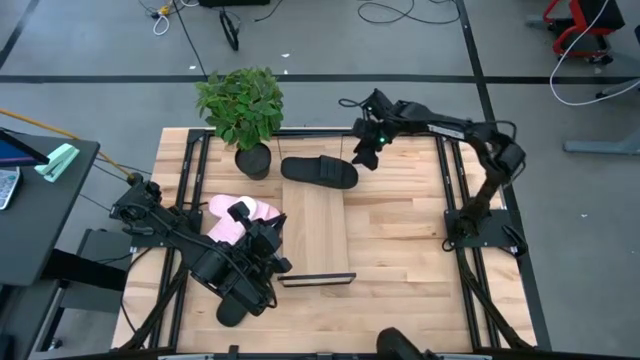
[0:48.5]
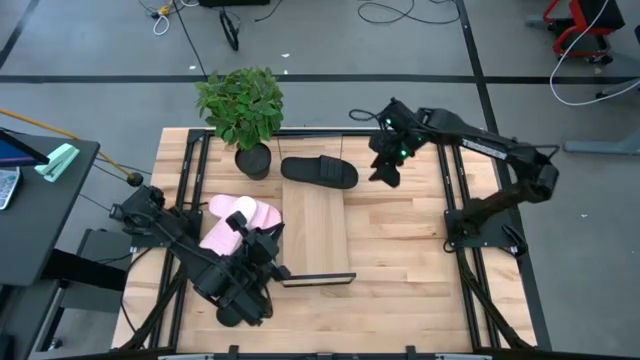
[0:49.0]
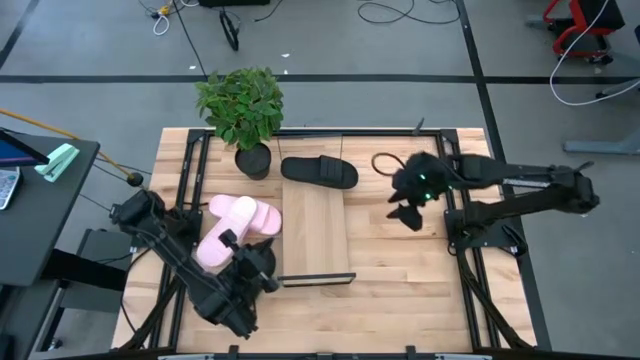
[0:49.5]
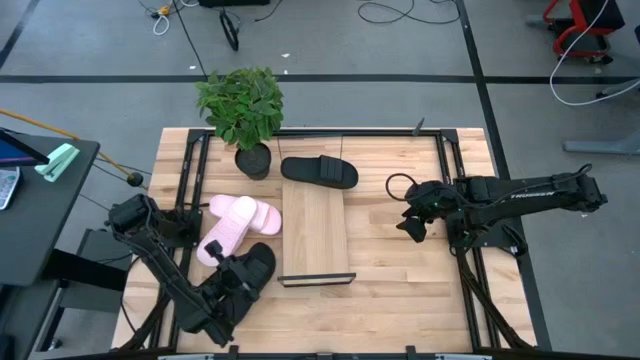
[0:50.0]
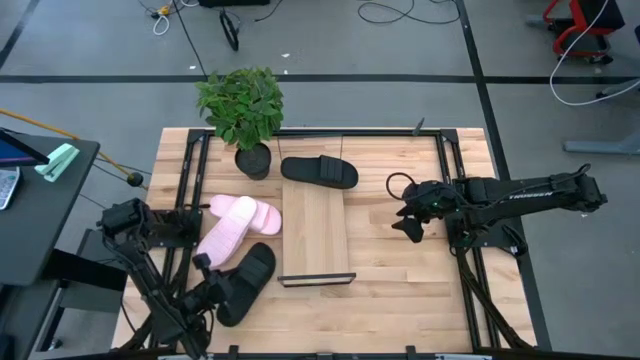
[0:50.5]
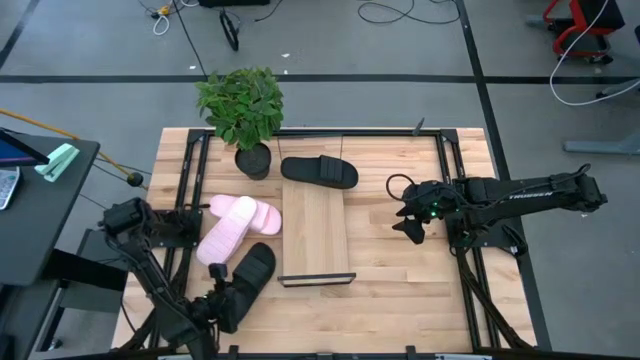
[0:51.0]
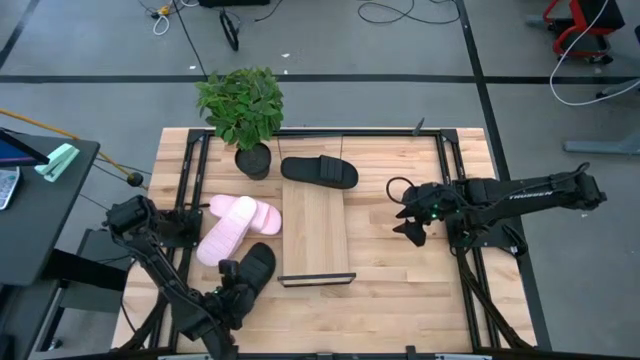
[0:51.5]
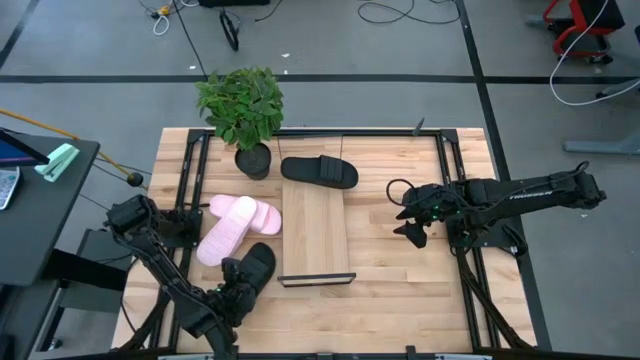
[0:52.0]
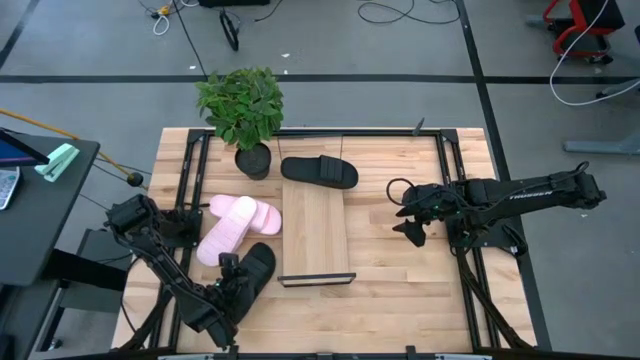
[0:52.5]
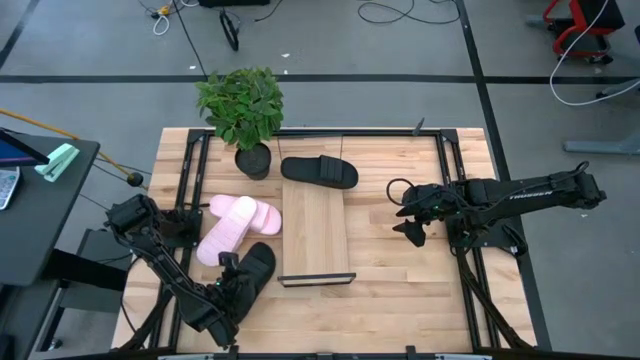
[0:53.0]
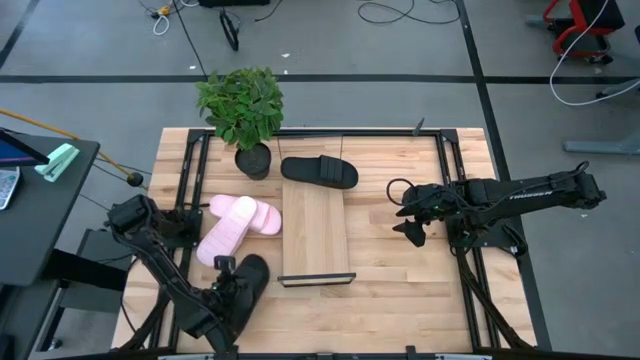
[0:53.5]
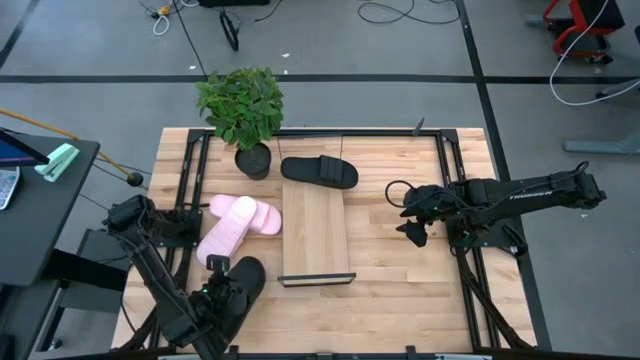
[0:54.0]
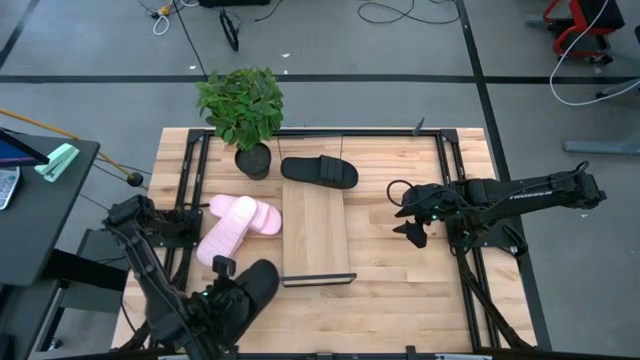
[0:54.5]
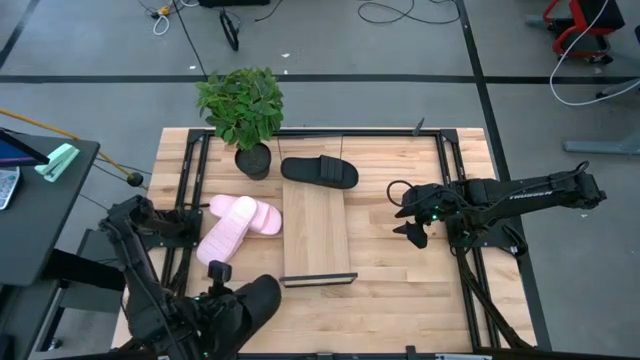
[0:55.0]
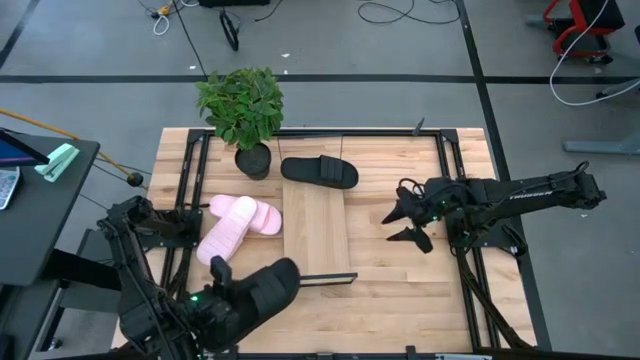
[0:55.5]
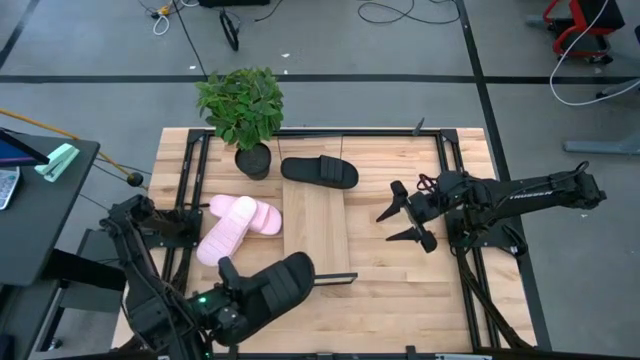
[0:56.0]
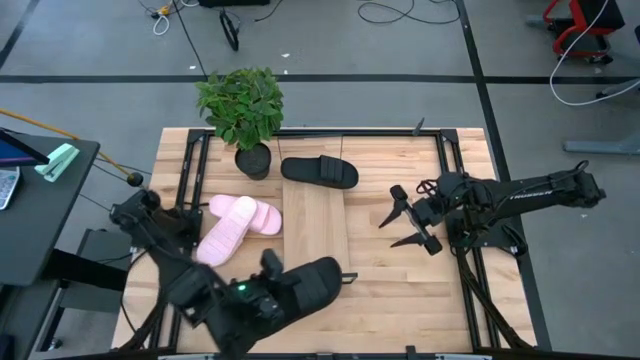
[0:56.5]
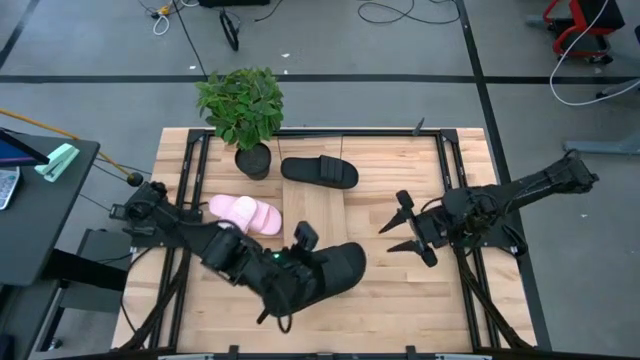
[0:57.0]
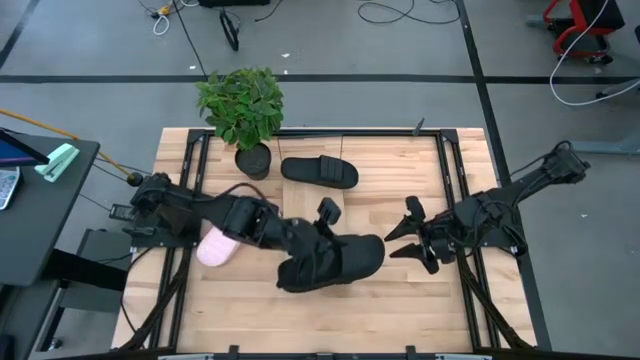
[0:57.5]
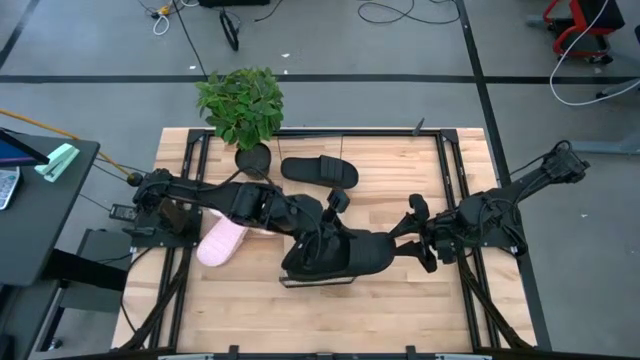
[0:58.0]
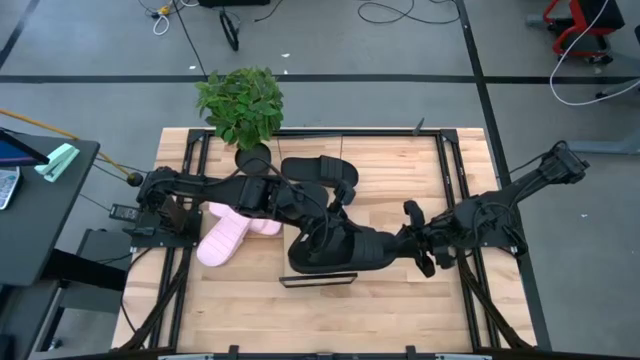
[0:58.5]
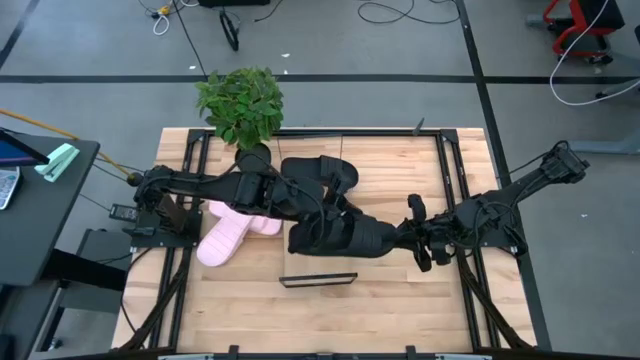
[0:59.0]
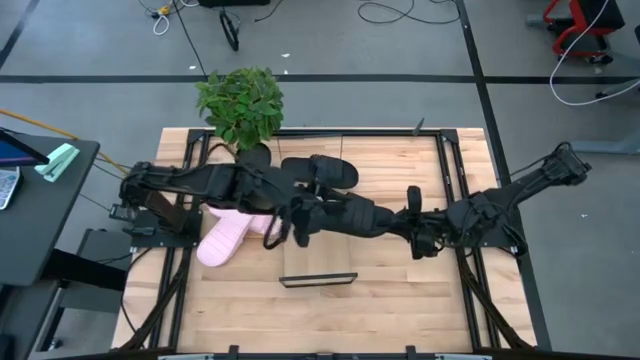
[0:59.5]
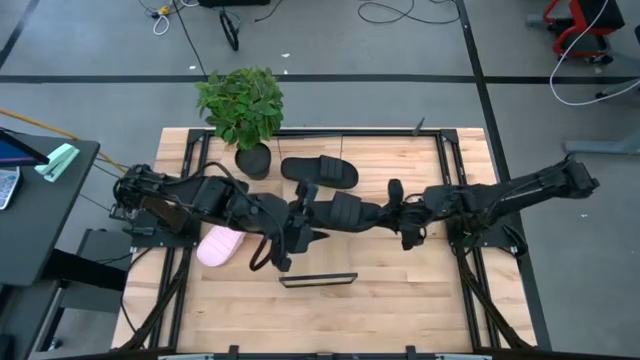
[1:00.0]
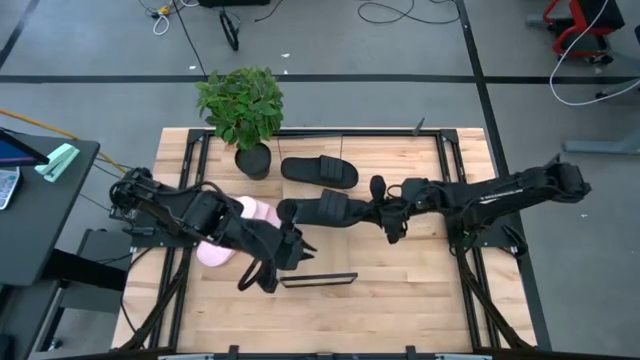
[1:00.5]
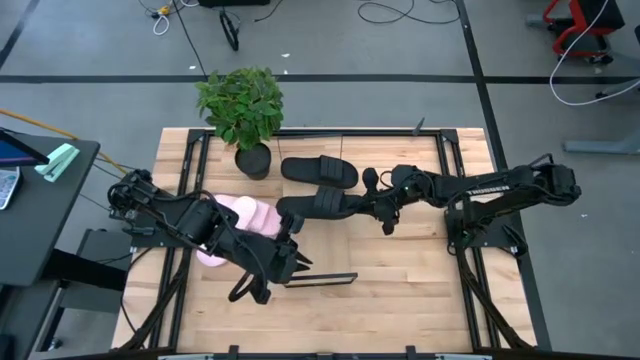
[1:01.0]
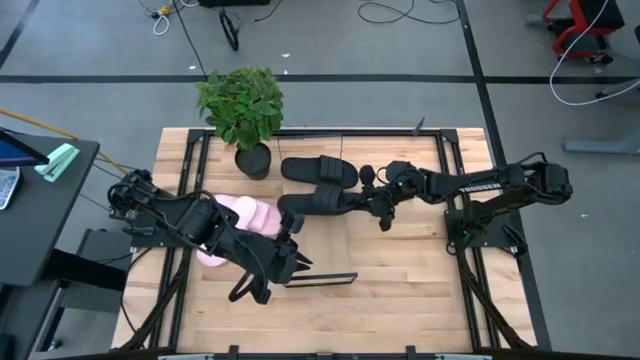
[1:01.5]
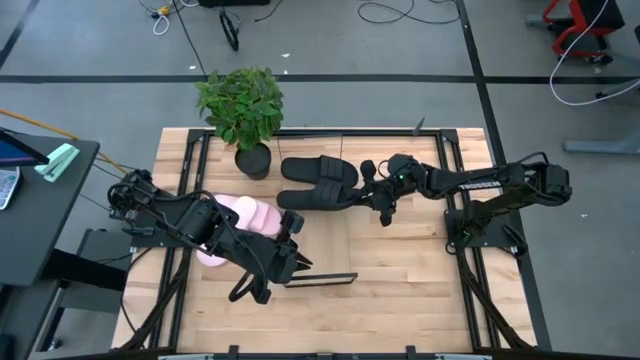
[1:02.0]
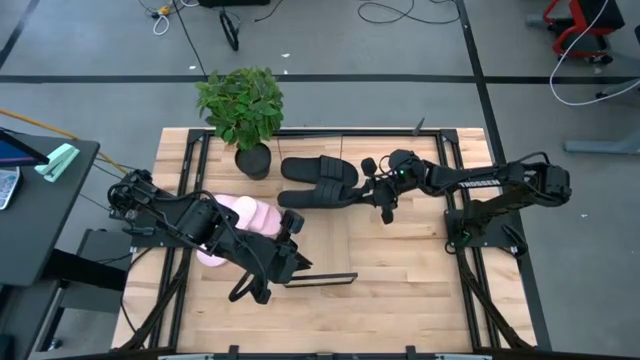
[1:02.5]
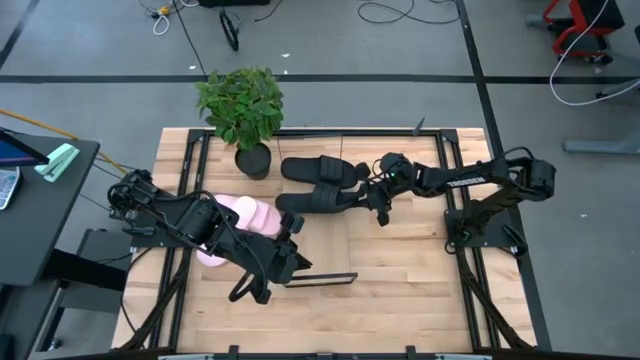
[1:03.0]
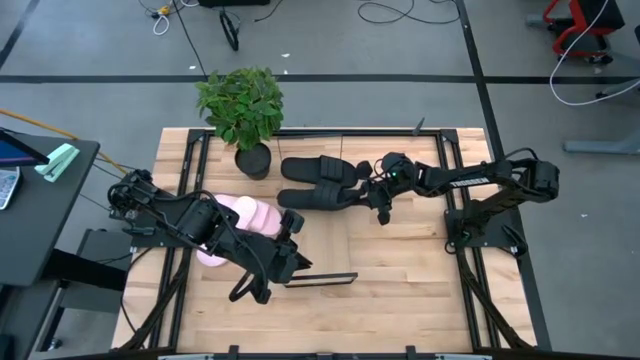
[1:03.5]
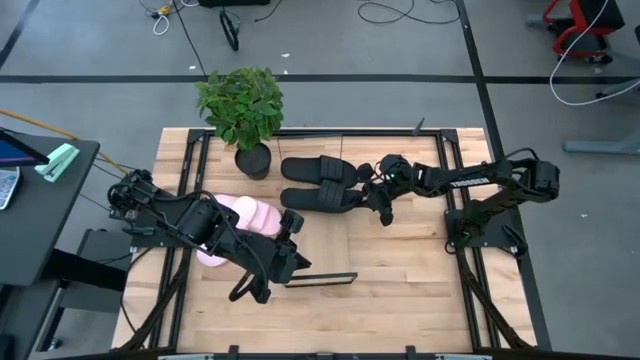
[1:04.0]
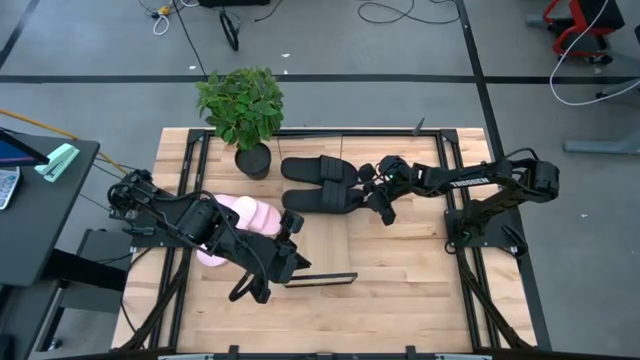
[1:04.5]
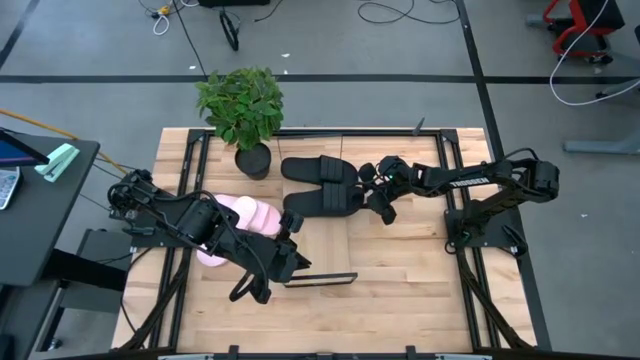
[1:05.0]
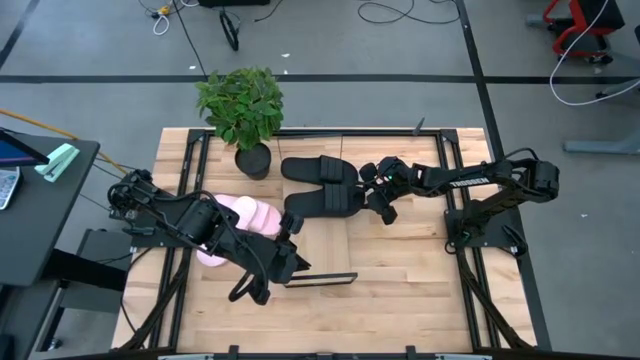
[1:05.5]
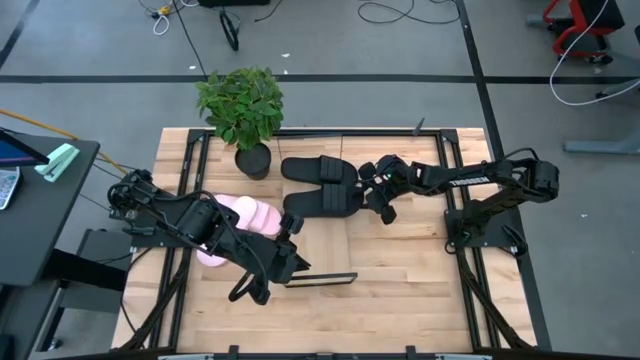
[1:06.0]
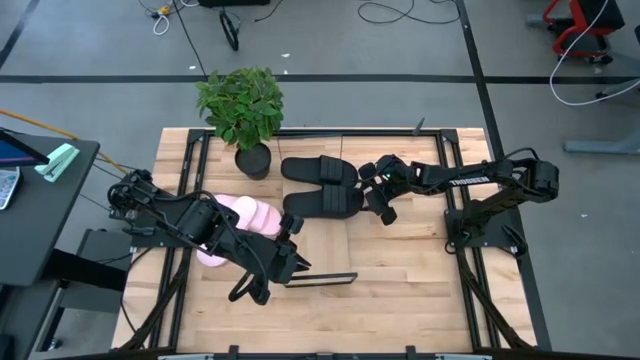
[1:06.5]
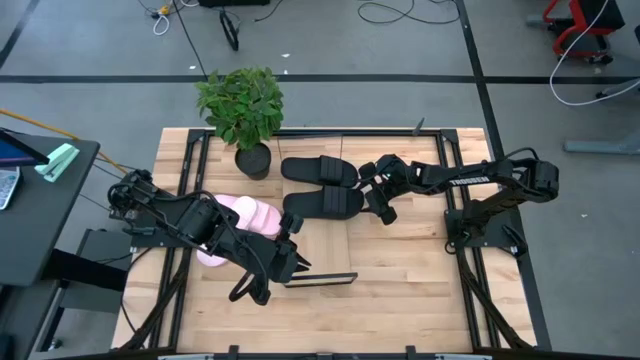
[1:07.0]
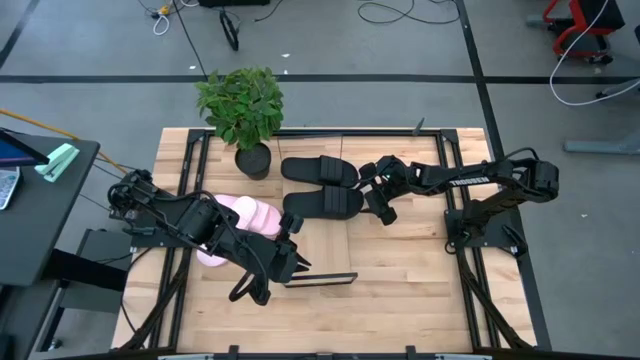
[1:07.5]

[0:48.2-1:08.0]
Task: Pick and place slides into the shelf
Put the black slipper on the shelf

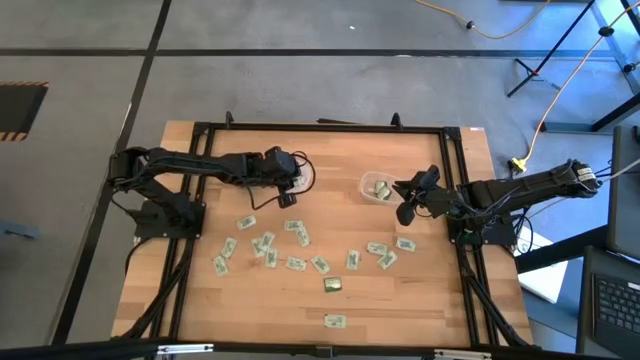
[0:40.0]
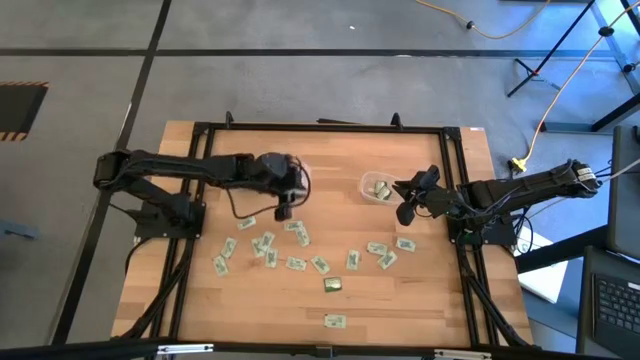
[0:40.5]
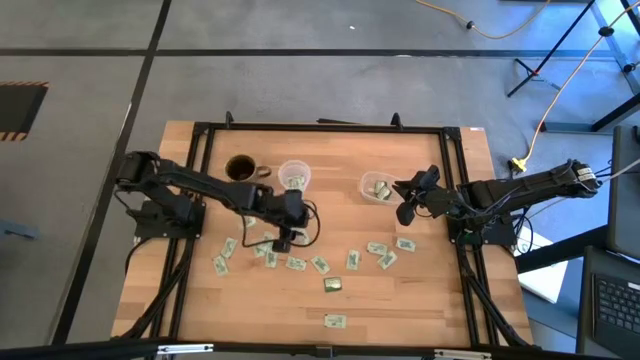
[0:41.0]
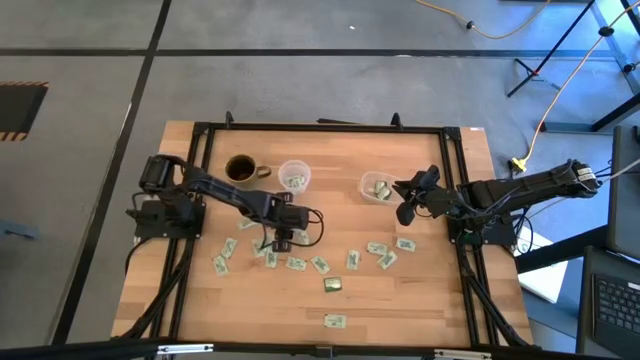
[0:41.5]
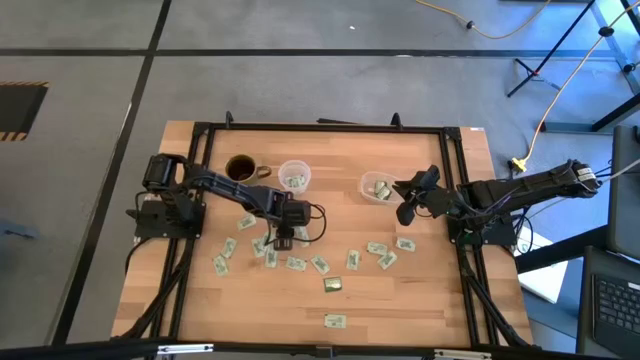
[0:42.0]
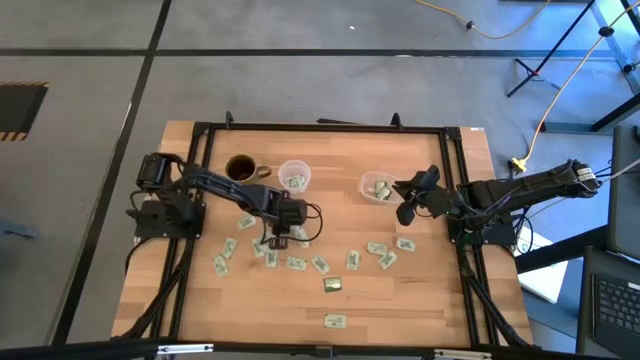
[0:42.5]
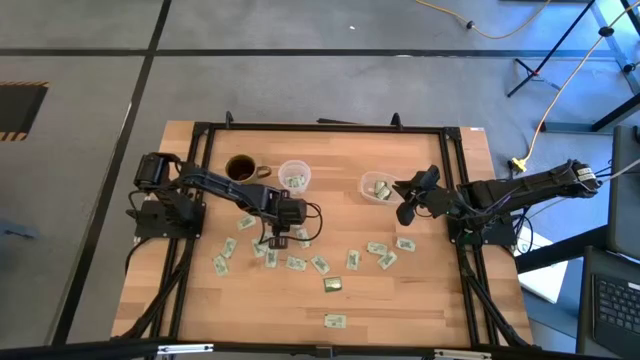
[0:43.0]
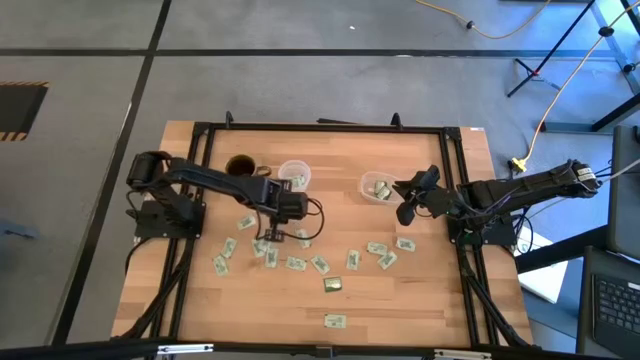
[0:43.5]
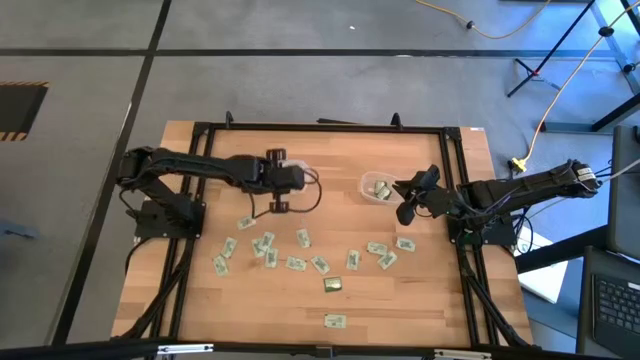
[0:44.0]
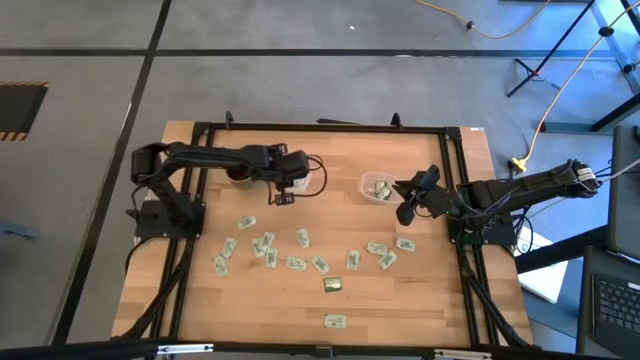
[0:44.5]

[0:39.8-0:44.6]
Task: Pick and place items into bin
Put the white stevia packet into the left transparent bin
